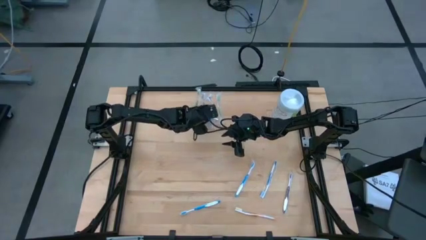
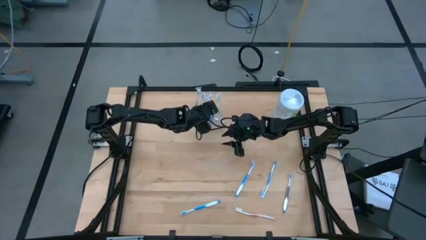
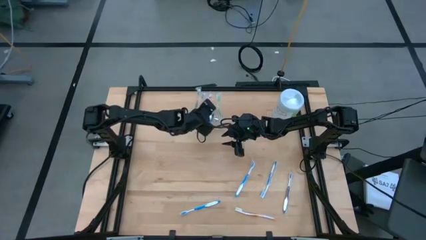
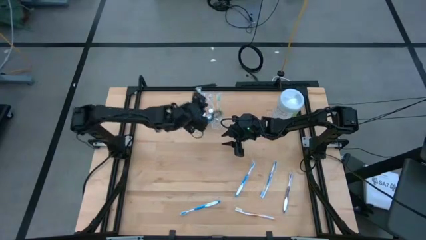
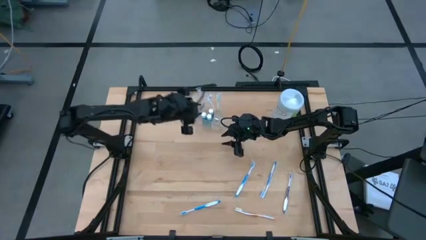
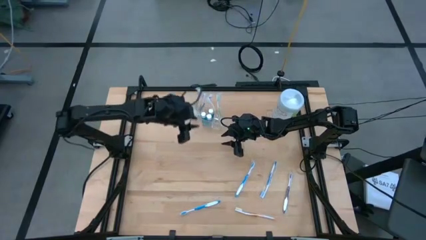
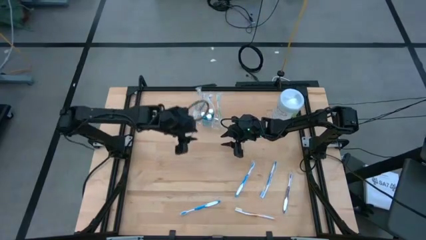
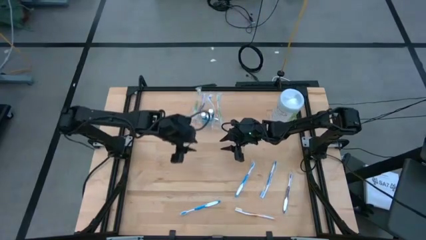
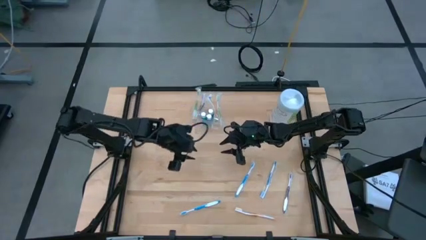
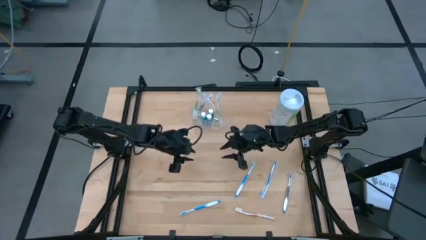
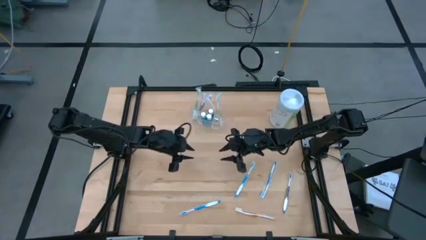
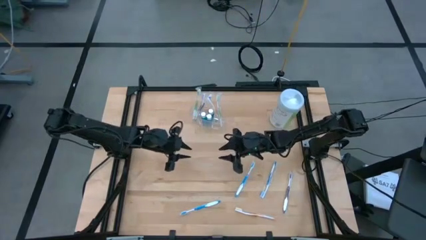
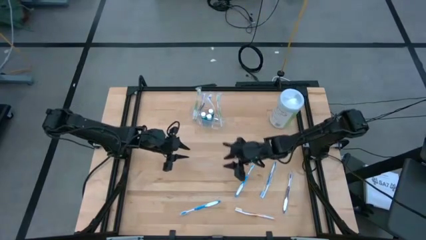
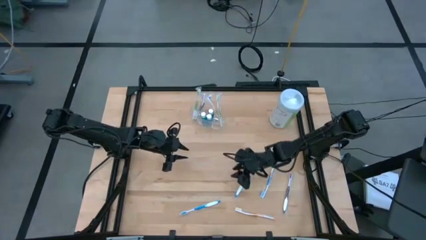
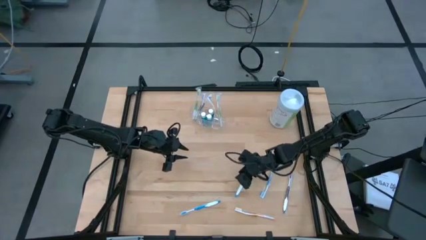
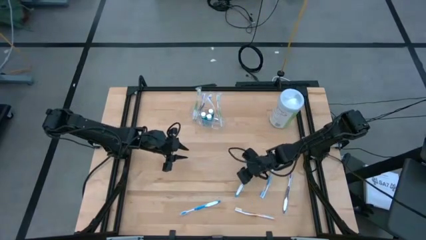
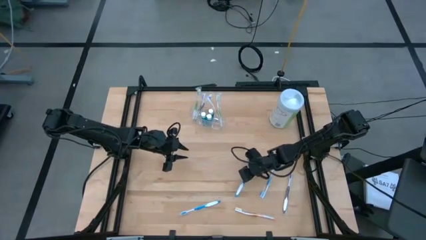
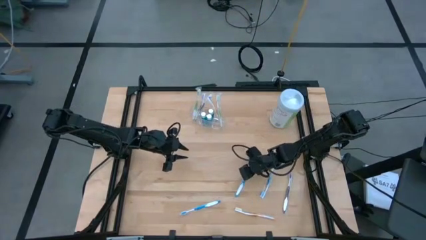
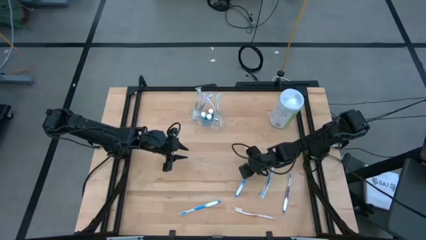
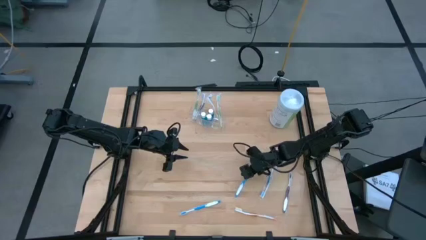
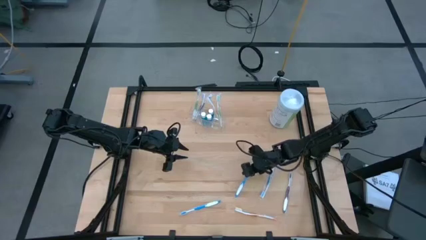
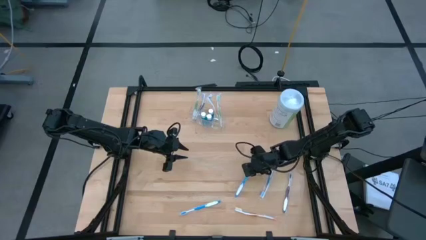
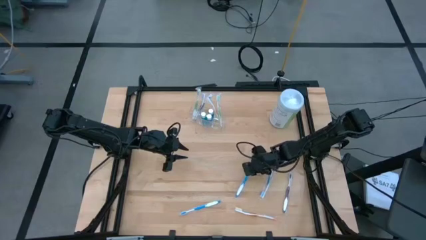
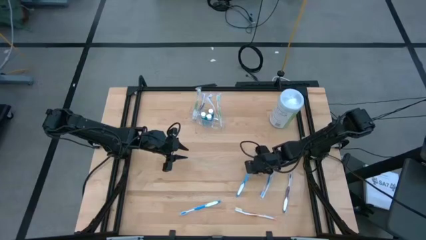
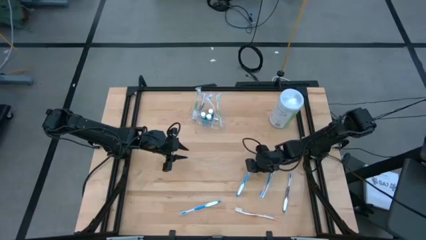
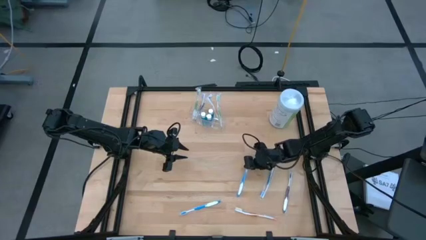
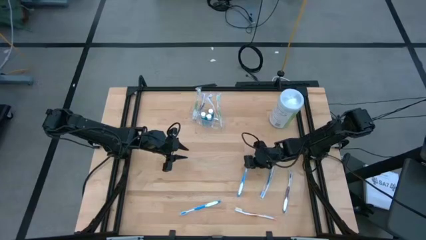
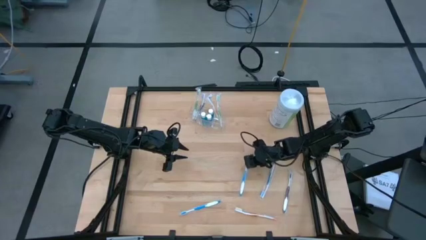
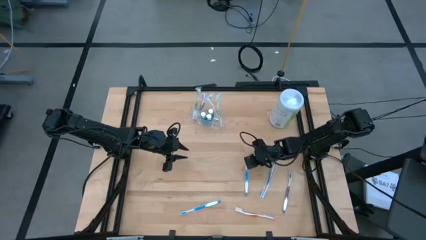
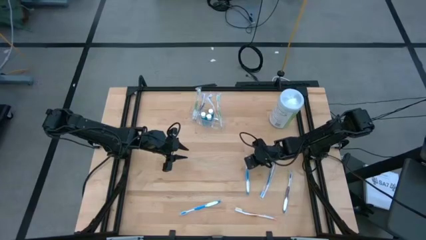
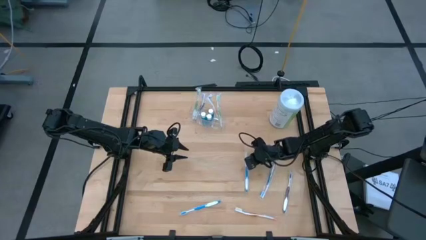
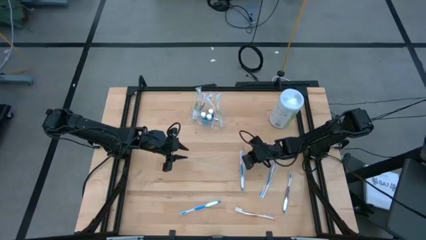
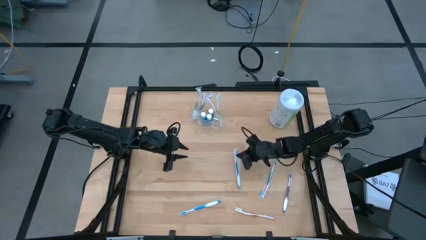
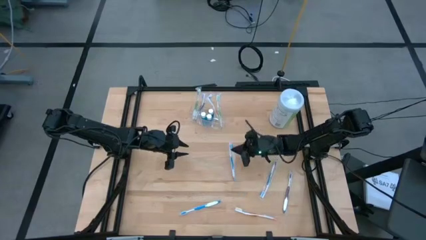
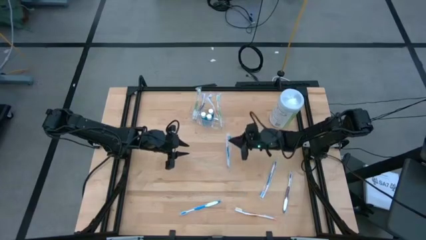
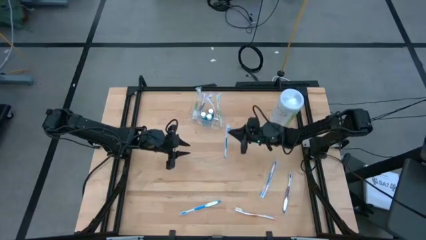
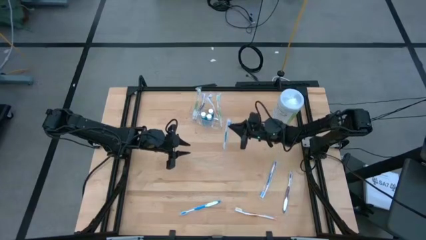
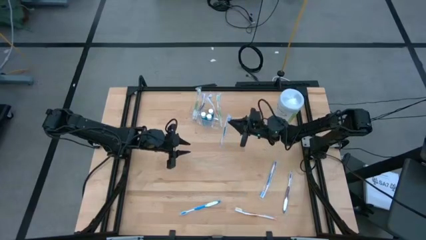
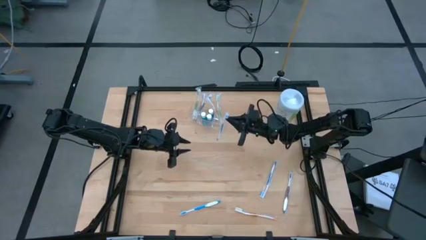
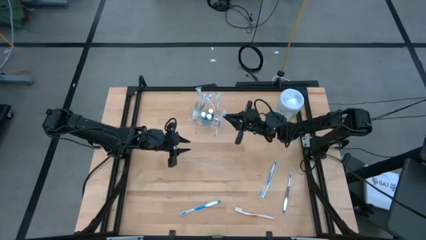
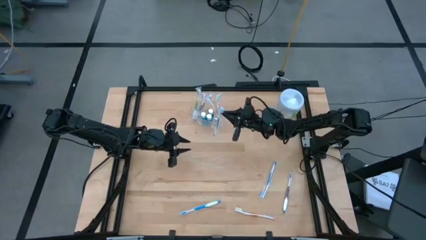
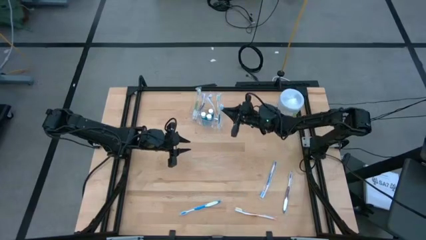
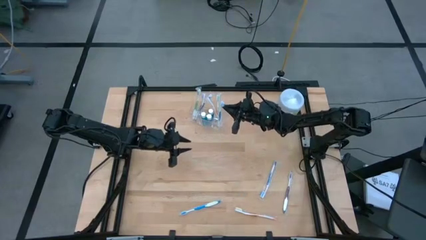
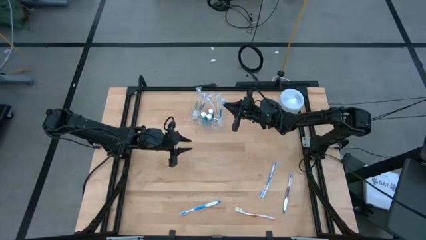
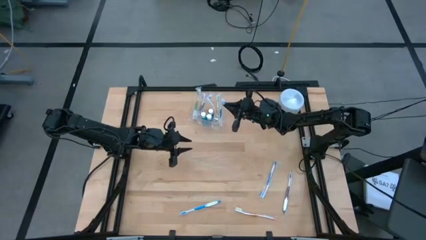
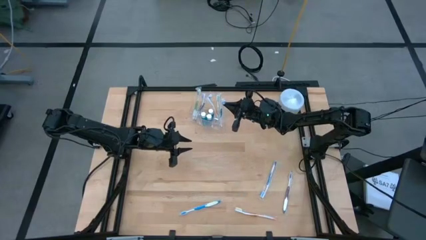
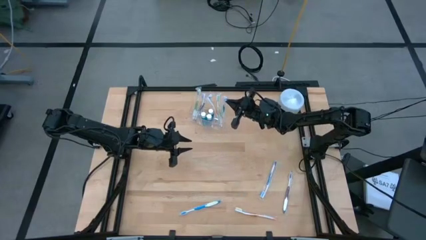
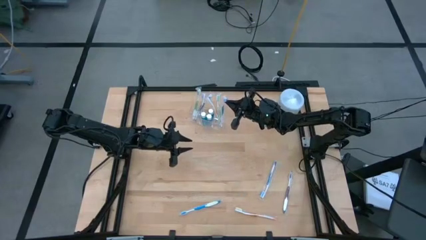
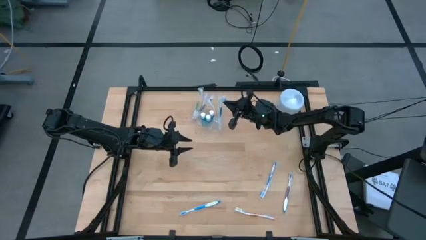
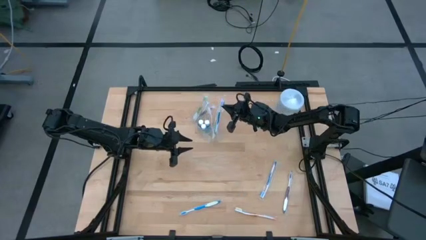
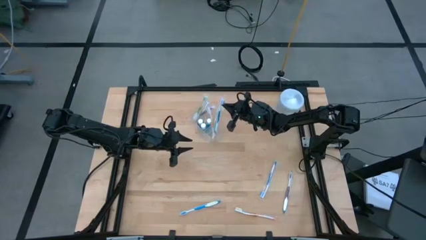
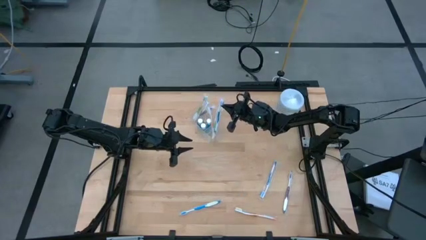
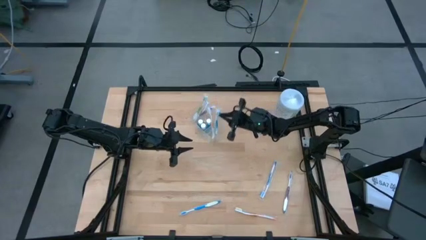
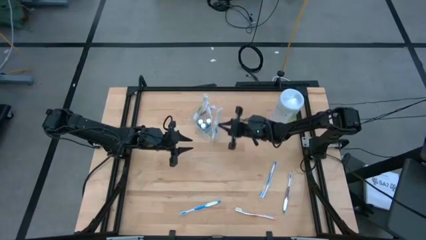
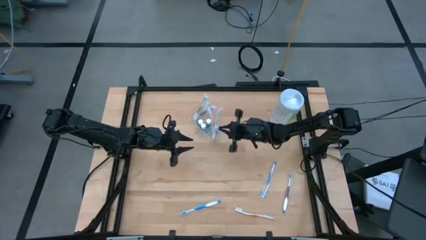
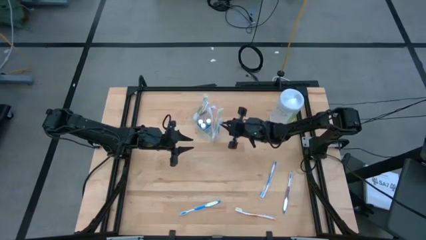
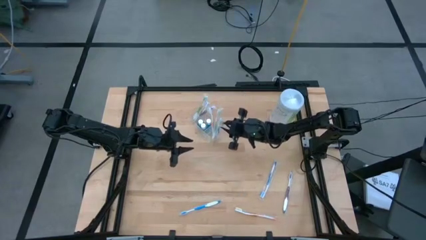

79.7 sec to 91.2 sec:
Task: Pick & Place toothbrushing station
Put the middle blue toothbrush into the right section of the organizer

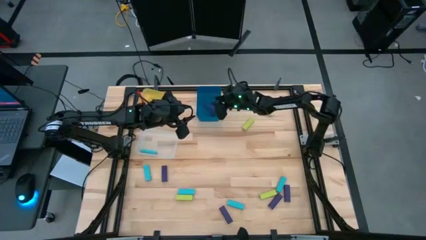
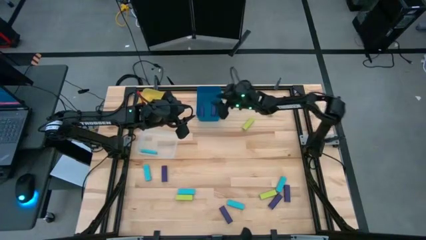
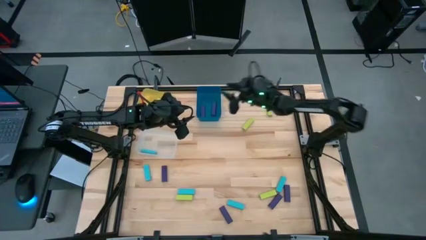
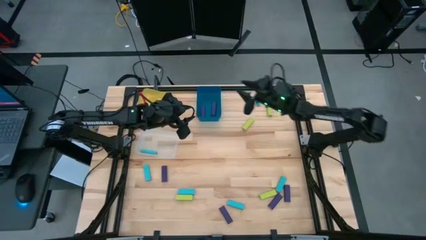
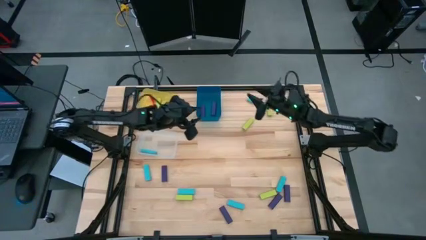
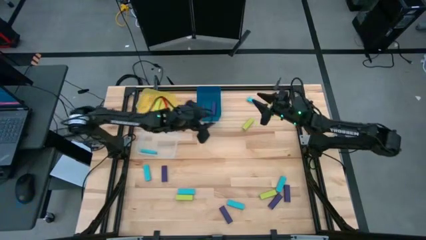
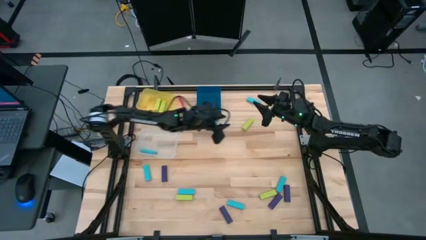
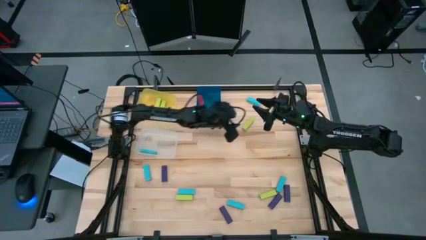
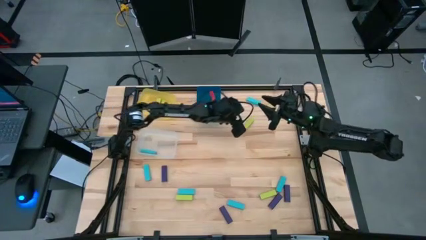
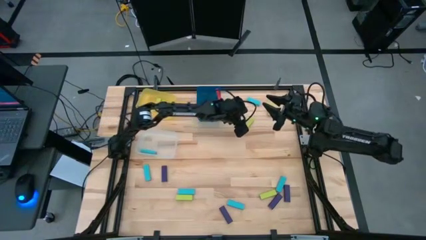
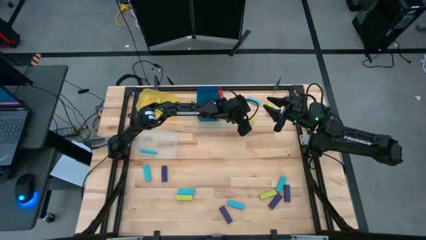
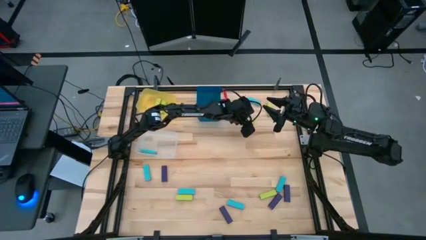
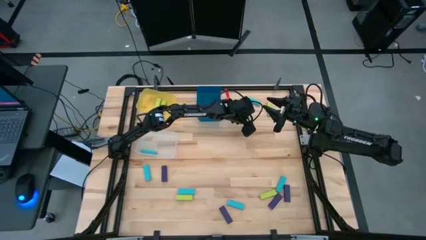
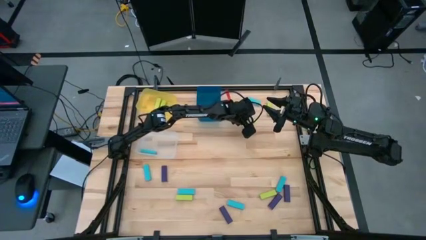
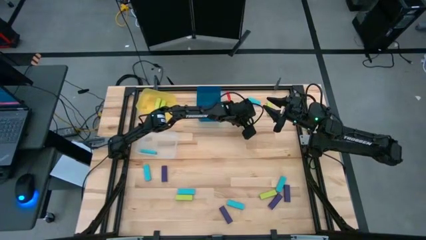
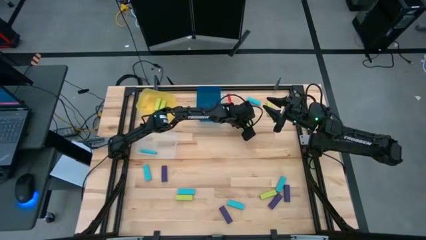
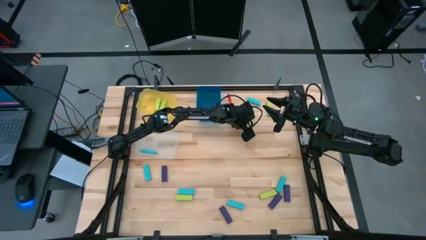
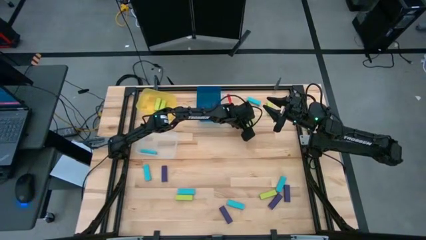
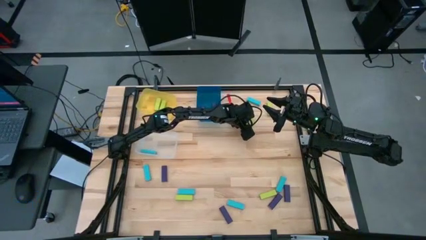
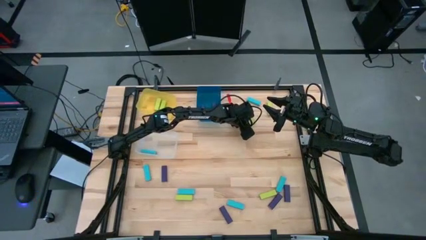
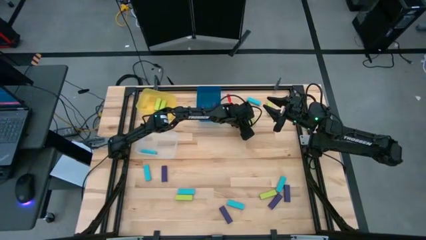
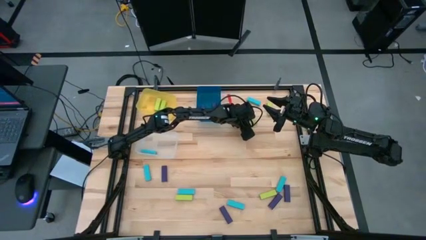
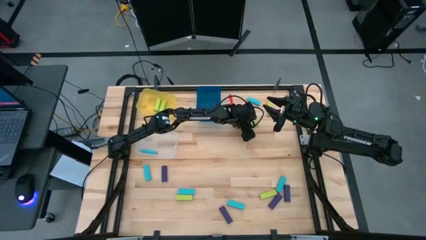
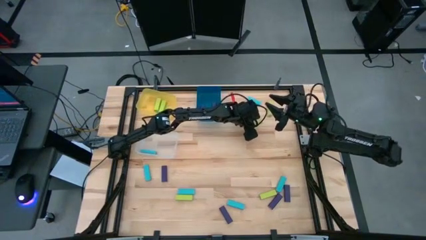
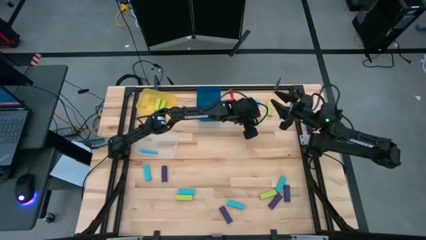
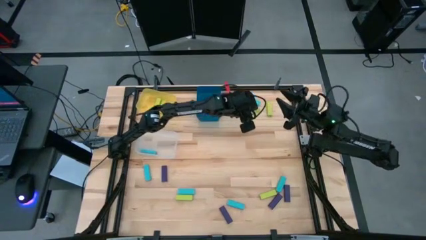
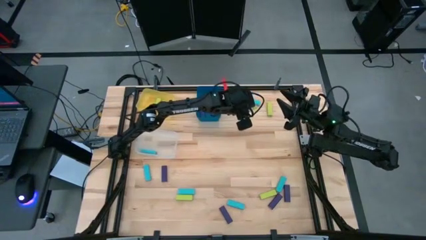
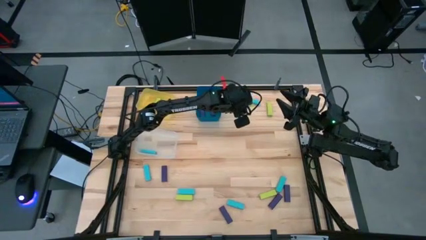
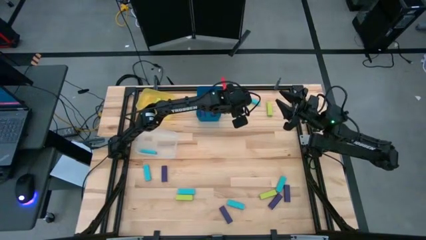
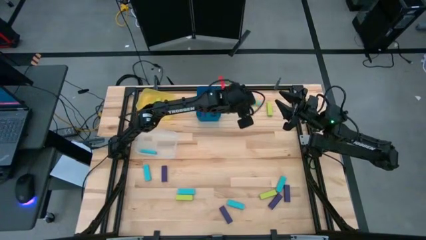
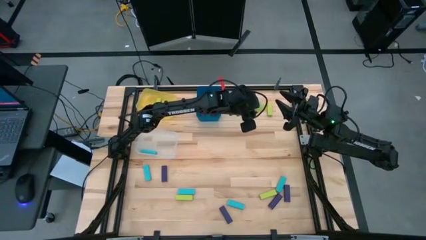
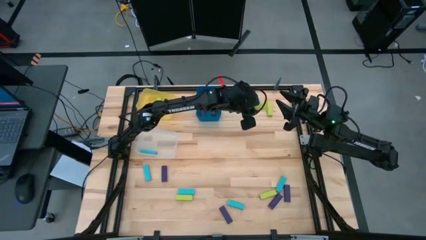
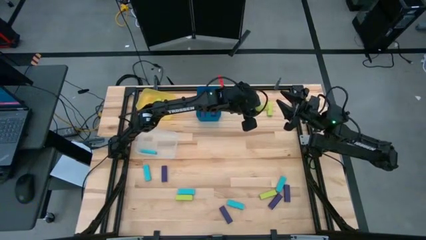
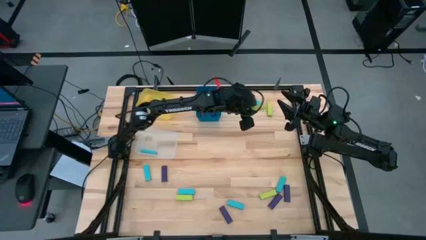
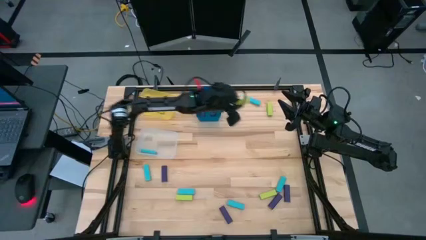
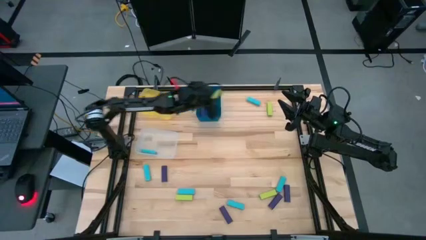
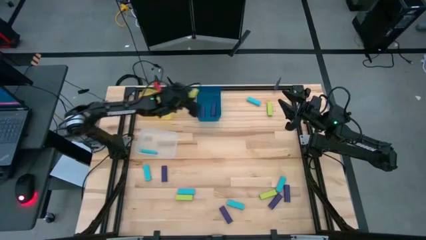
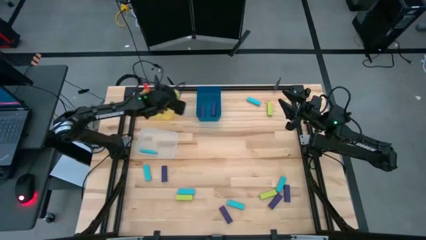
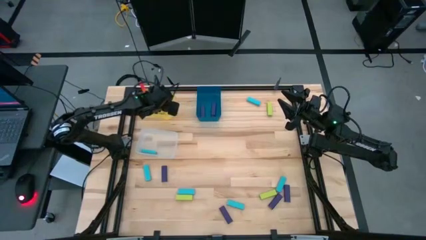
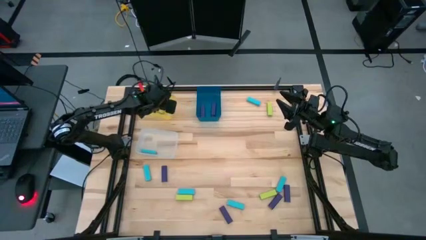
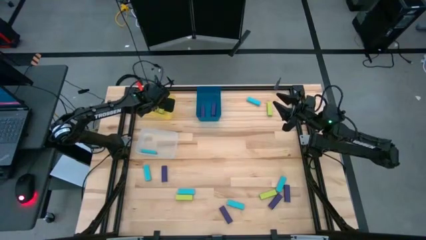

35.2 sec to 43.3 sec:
Task: Sort blocks
Put the green block into the yellow bin
